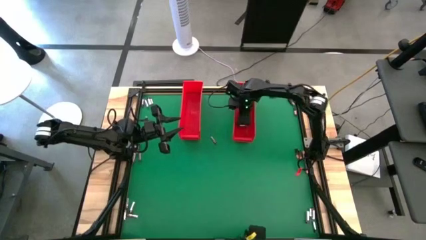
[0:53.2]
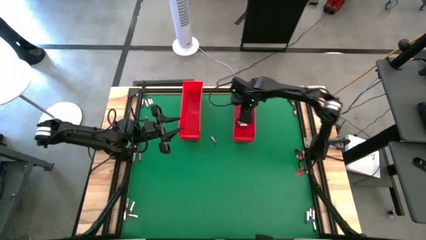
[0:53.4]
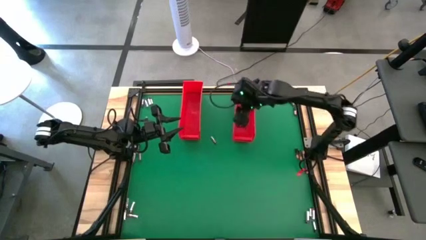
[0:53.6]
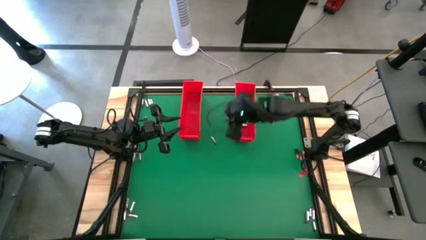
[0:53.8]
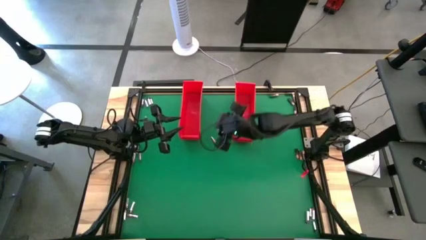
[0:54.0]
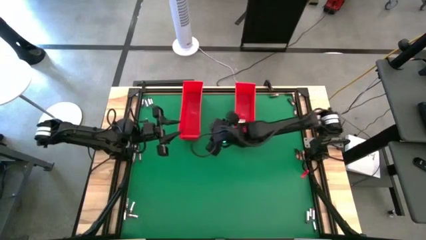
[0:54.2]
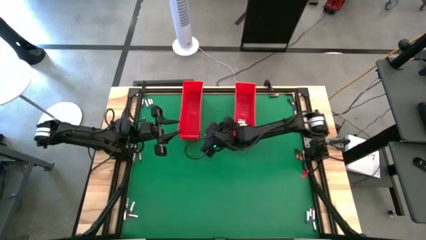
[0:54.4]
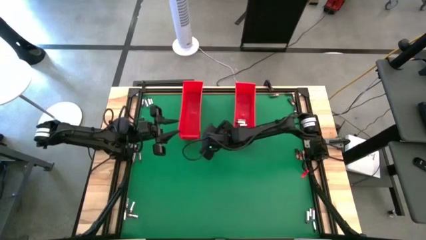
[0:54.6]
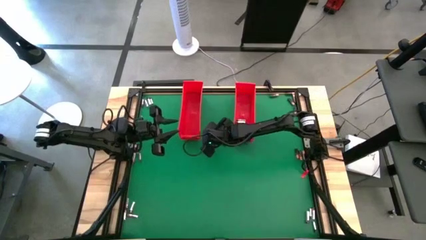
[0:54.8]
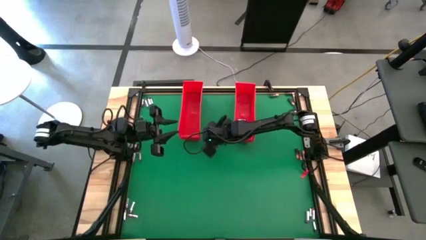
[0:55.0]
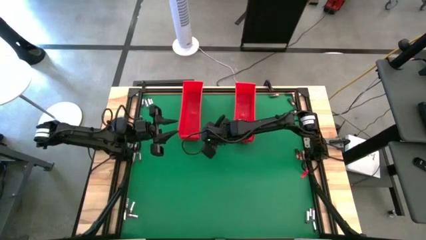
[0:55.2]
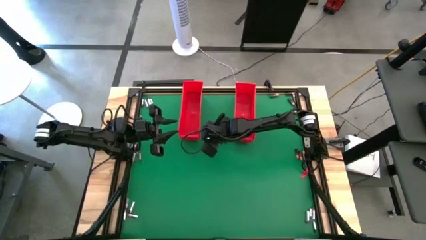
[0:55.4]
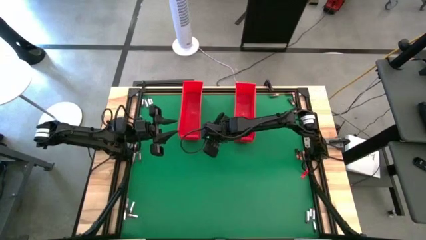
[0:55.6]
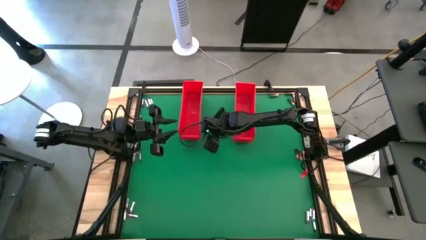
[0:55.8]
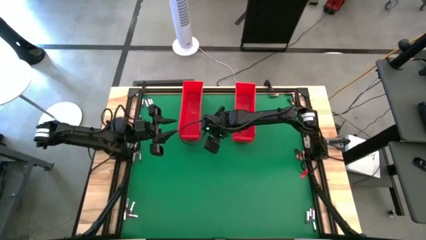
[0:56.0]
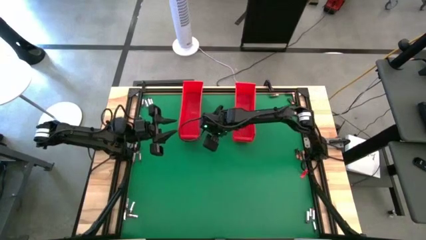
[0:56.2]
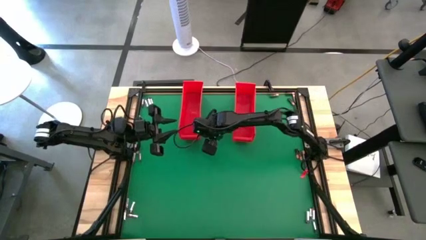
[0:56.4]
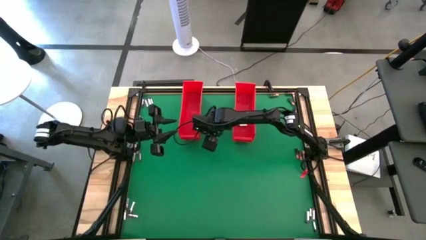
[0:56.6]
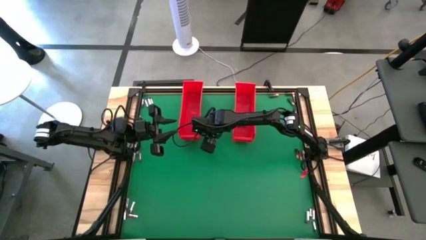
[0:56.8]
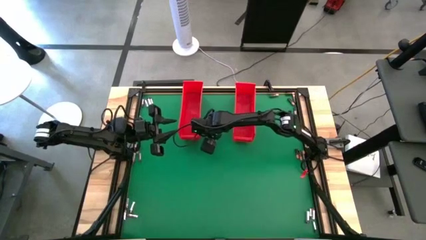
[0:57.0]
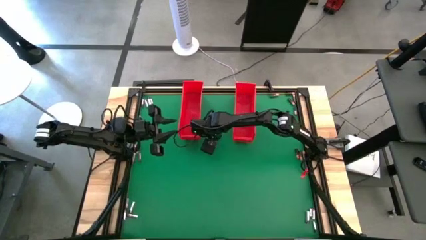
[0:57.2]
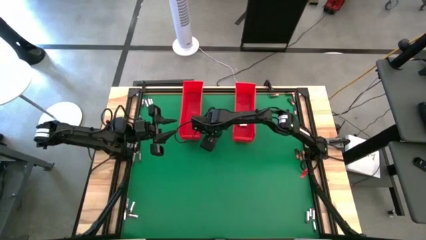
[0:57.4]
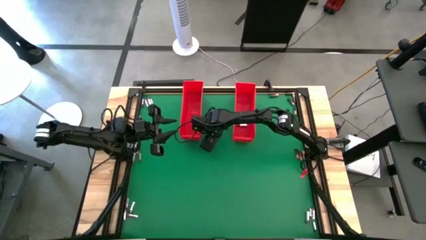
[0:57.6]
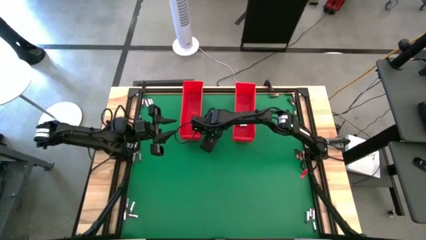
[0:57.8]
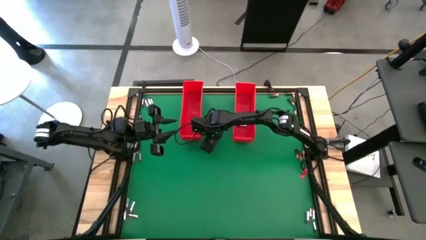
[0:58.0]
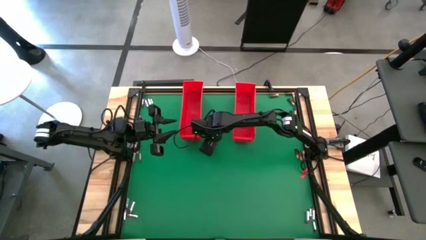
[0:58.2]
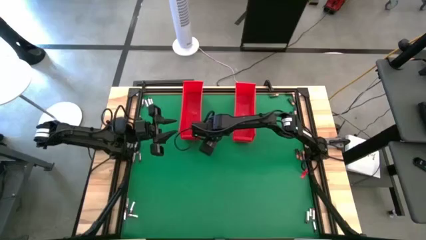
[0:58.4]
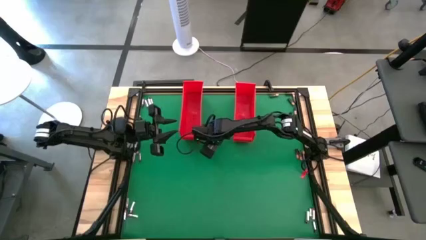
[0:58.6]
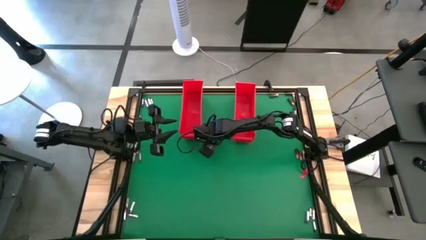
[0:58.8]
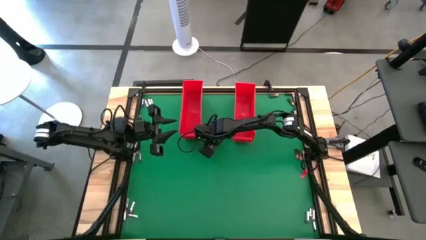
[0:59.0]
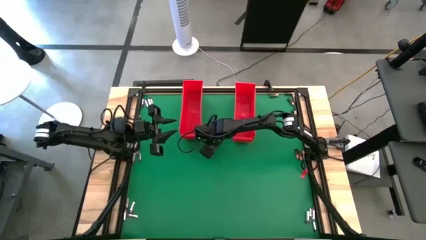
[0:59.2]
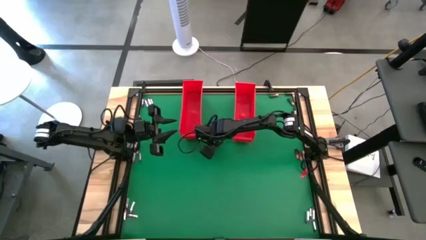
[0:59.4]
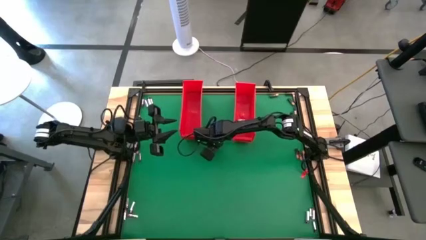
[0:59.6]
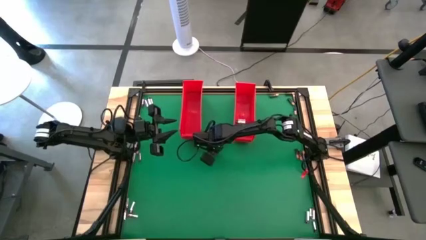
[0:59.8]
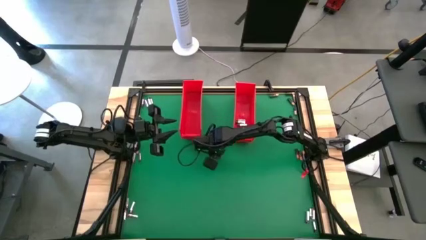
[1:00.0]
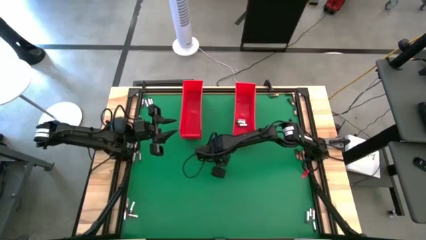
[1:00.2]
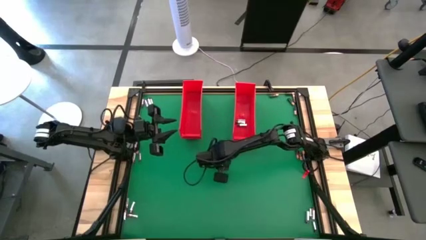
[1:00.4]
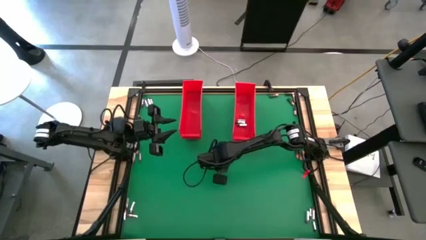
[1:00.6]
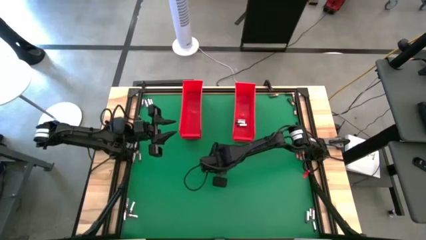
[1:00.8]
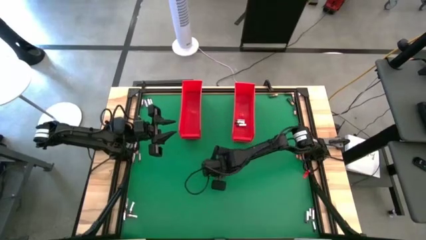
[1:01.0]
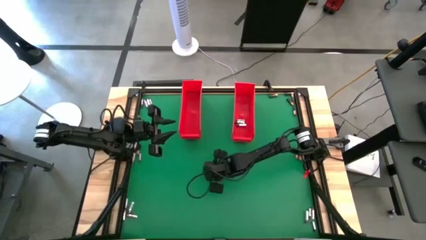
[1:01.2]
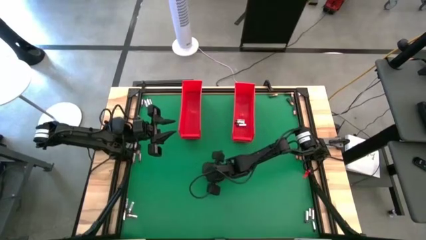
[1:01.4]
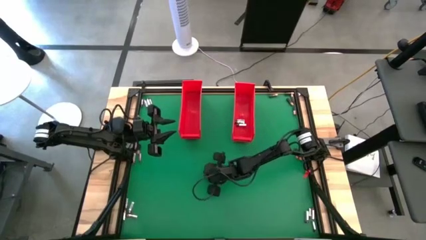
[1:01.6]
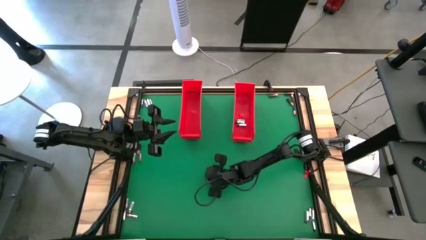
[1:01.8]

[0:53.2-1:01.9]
Task: Sort batteries
Put the silver battery into the right red bin

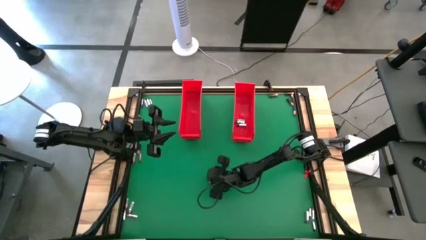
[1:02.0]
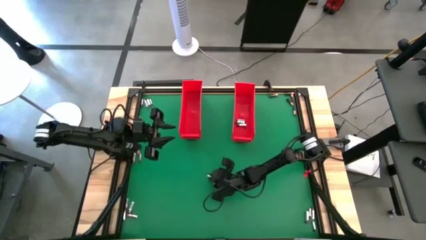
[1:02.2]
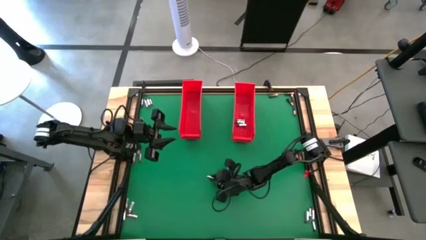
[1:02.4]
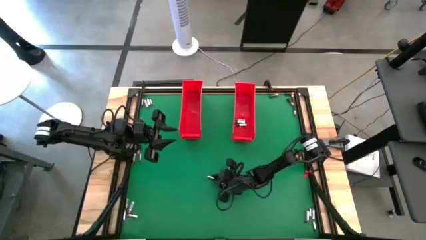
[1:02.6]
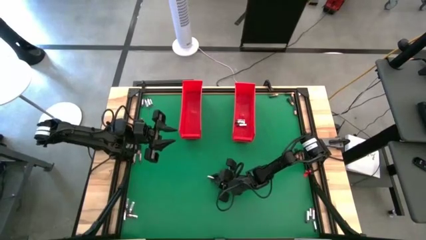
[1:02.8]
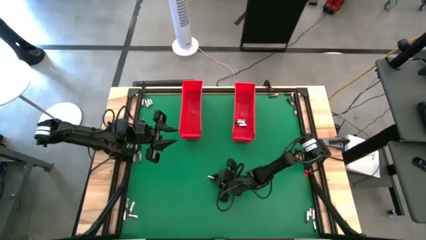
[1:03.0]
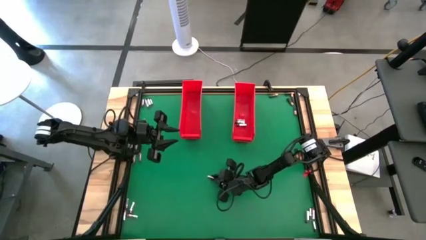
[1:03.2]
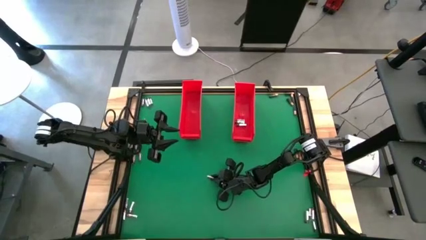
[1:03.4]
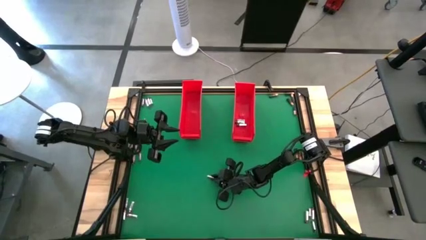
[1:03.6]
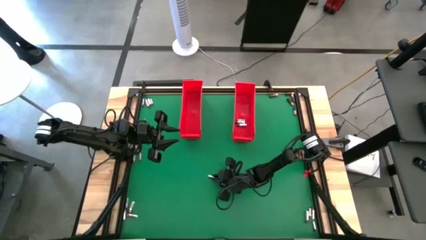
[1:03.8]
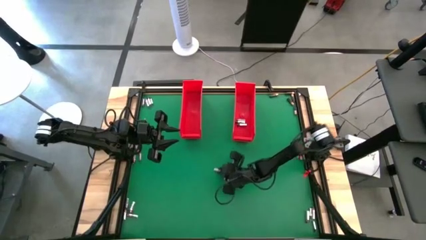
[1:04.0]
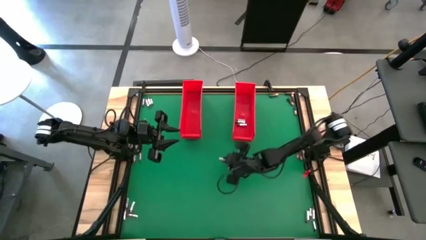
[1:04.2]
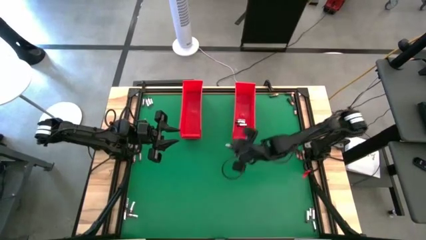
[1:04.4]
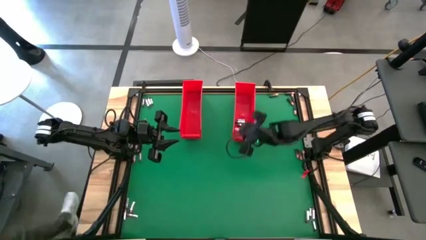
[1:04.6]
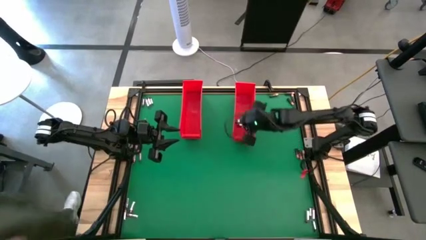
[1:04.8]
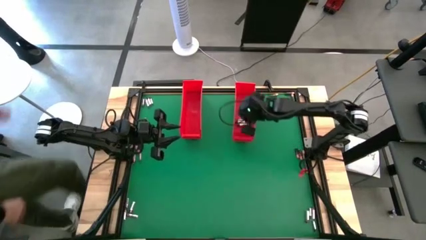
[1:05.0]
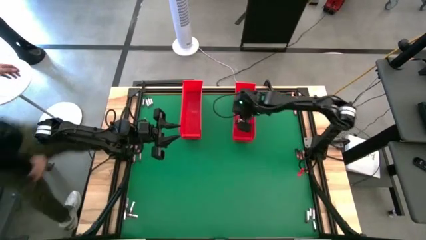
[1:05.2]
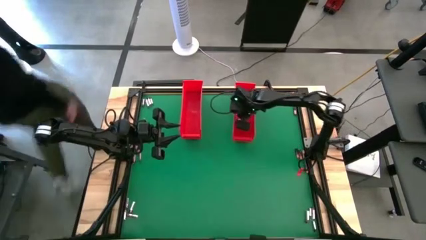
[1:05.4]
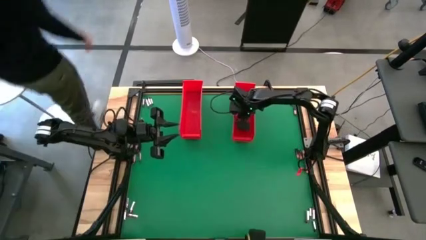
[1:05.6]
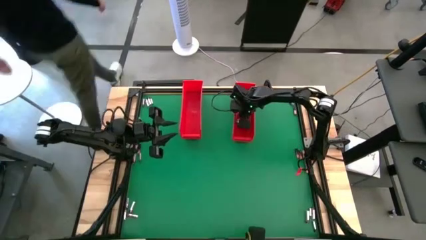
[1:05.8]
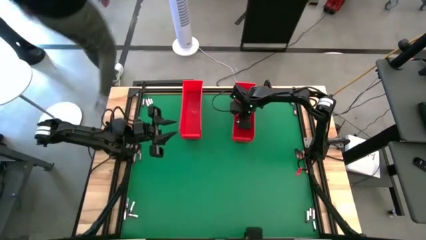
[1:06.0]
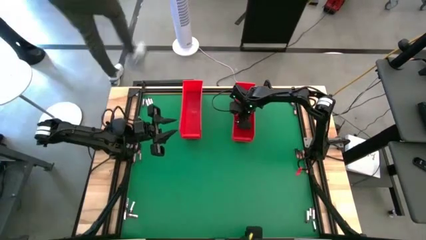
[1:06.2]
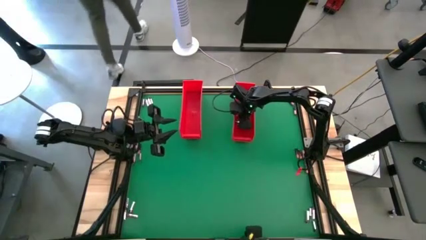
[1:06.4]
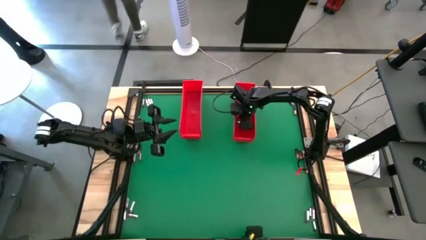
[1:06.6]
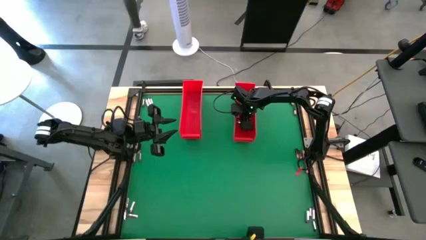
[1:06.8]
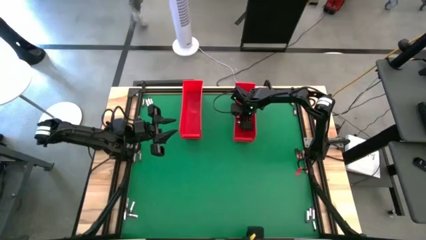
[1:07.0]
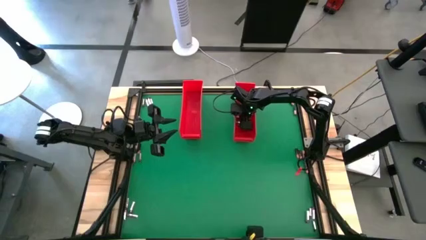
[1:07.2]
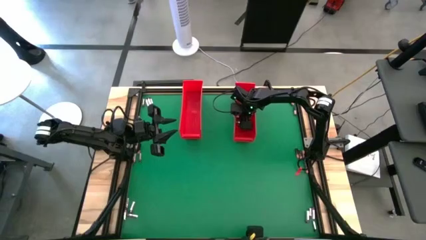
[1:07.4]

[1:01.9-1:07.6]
Put the silver battery into the right red bin

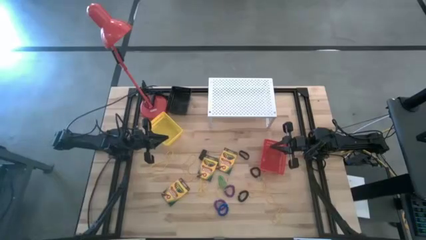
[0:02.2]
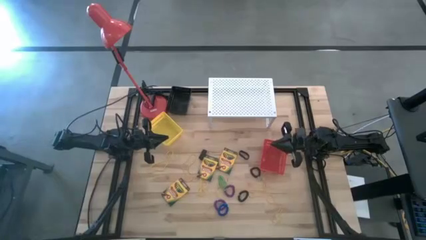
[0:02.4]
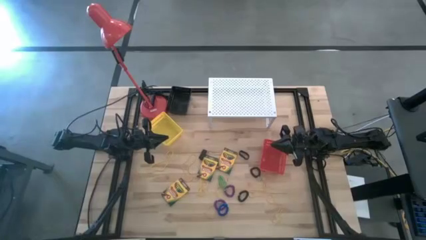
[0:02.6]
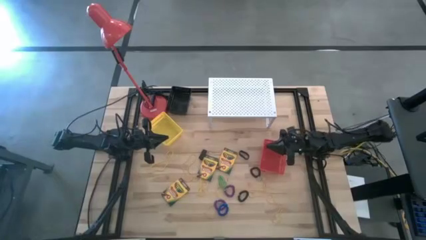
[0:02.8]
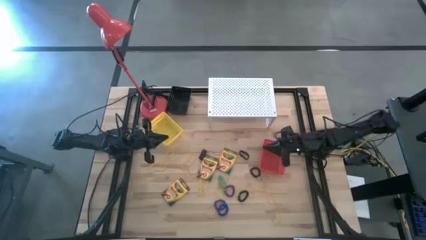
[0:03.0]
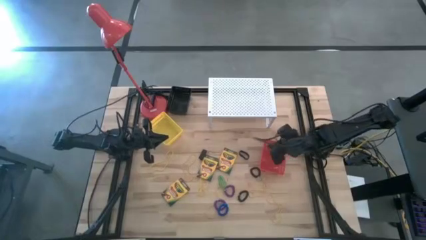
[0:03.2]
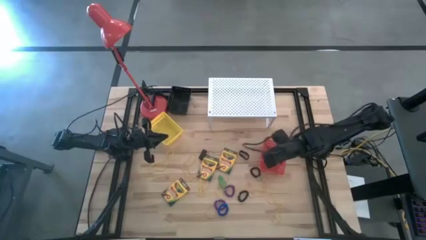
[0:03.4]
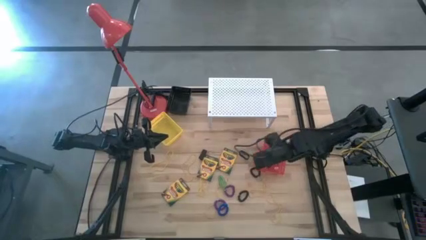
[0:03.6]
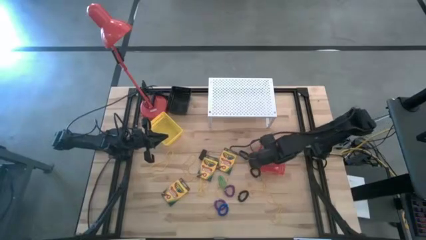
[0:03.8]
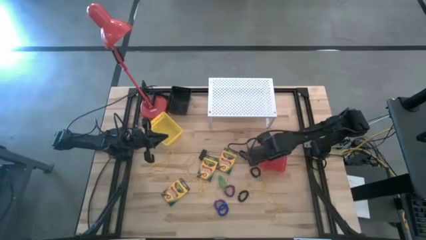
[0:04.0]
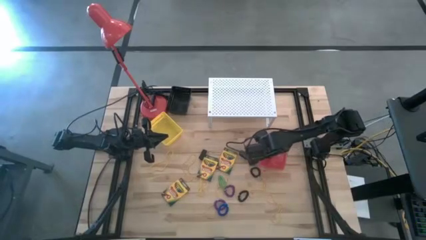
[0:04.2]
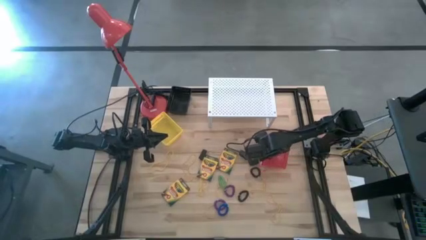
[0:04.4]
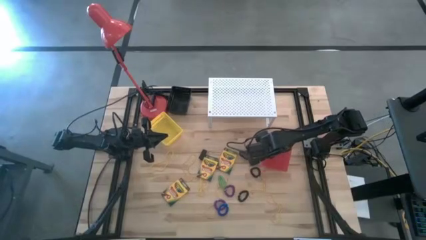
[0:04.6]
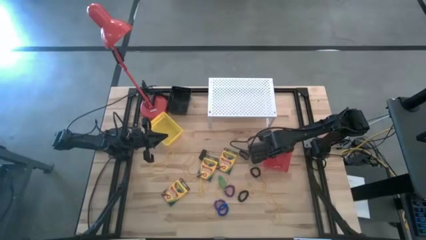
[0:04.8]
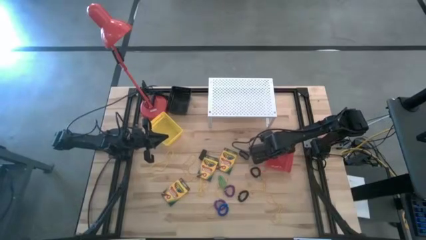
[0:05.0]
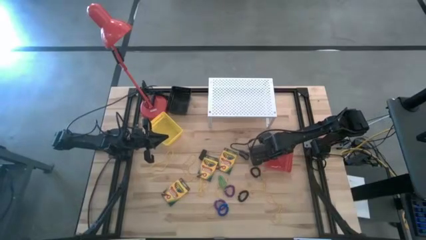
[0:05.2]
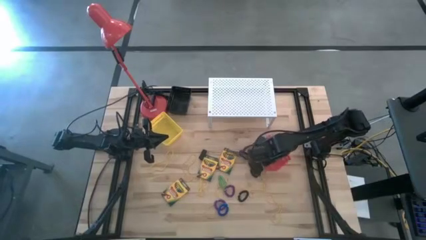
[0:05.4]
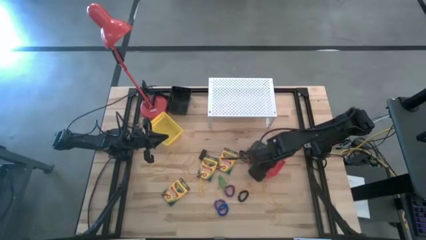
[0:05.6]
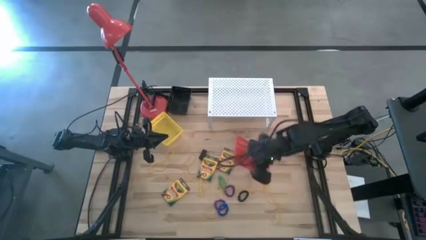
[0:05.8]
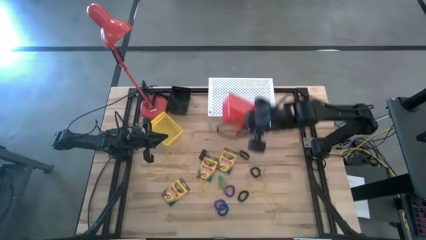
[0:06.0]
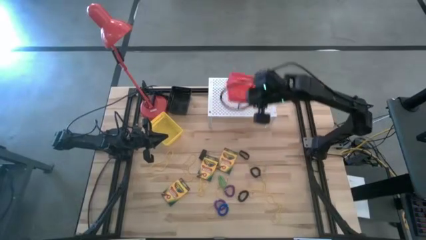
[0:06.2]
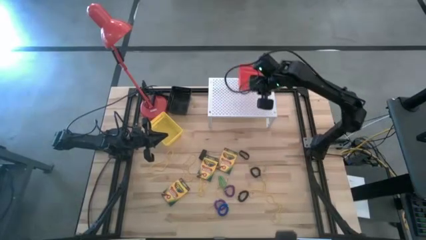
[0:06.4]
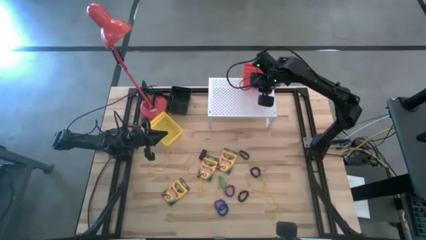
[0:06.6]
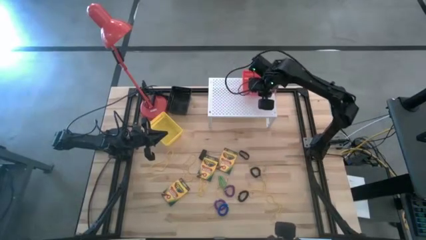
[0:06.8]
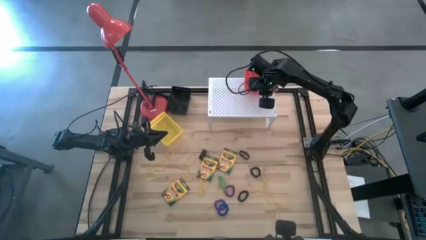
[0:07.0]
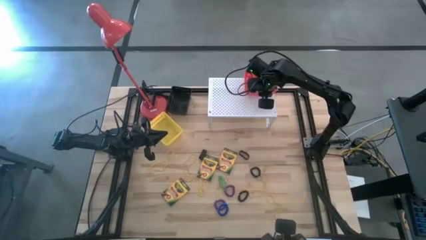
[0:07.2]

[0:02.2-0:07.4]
Task: Pick & Place Office Desk Supplies
Put the red bin on the shelf
